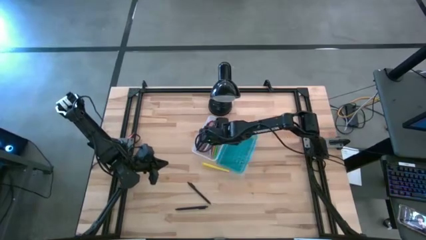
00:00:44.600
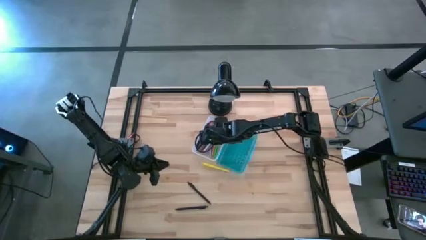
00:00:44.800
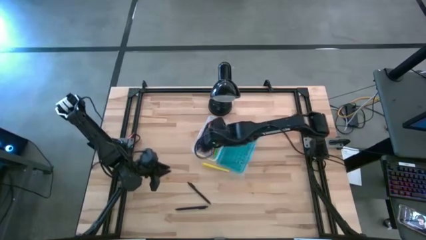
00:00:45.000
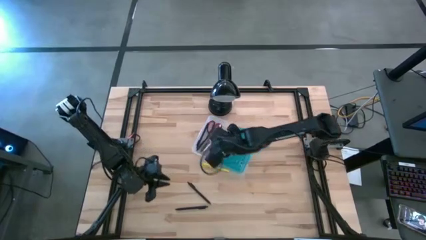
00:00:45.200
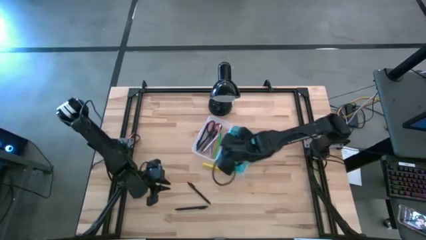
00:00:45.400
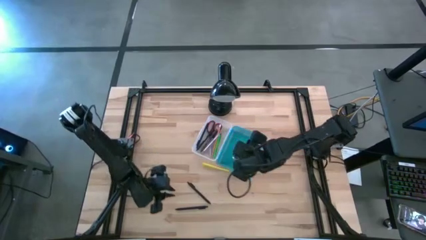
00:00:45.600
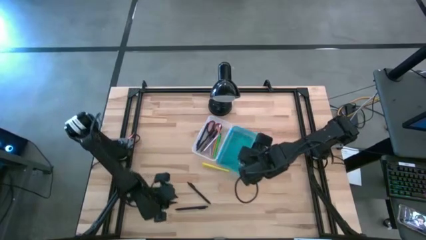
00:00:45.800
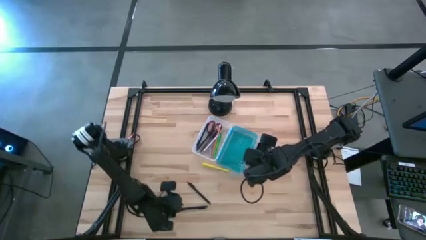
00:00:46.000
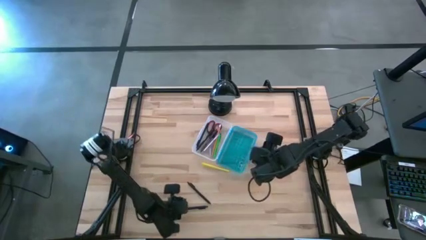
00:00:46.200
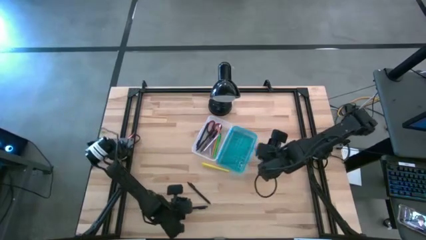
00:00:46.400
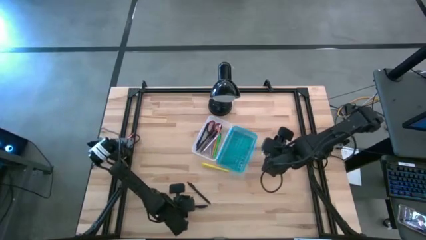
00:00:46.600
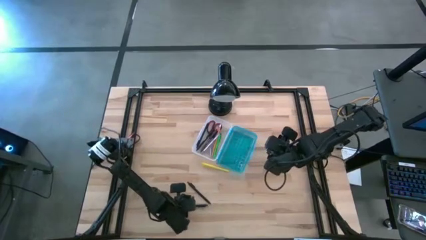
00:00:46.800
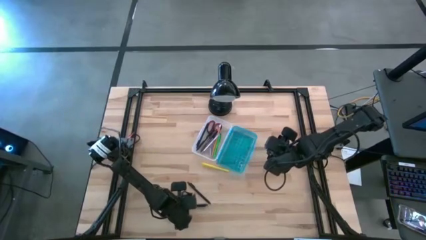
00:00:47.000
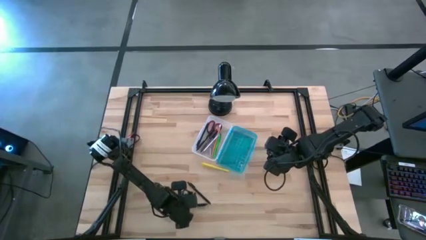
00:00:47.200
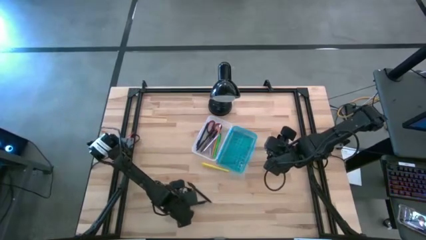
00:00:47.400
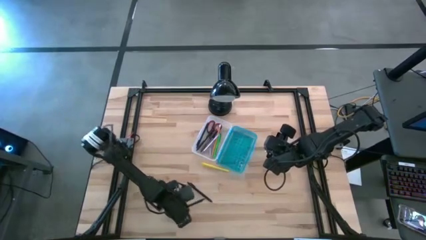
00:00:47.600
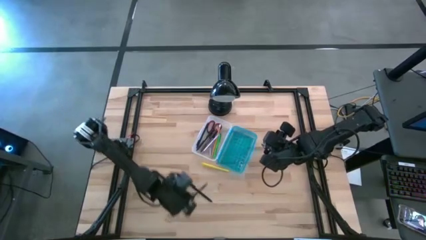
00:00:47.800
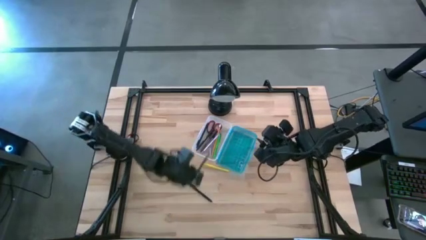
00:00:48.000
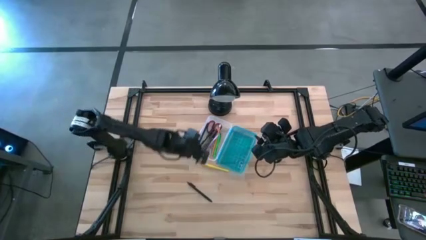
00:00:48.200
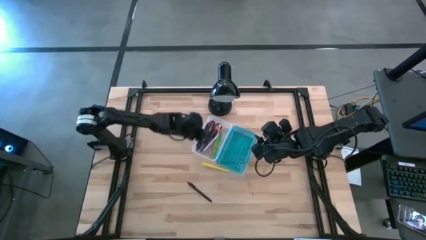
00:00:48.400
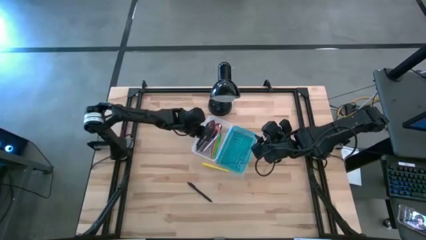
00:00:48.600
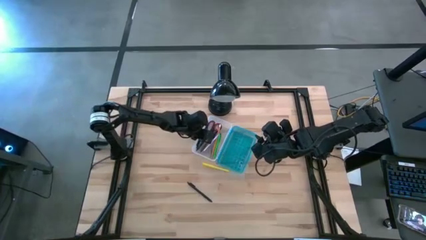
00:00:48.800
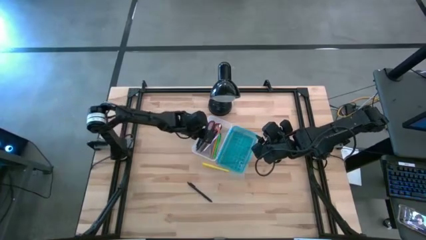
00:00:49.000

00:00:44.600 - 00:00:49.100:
Task: Pick & place school supplies into a supply box
Put the black pen into the supply box

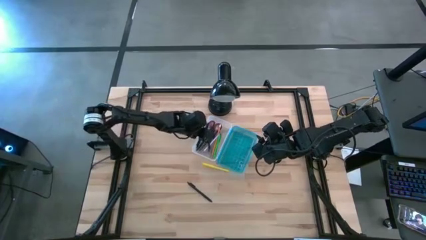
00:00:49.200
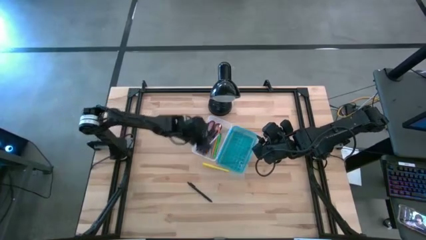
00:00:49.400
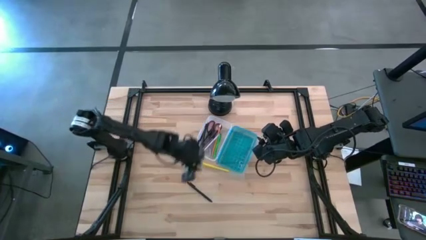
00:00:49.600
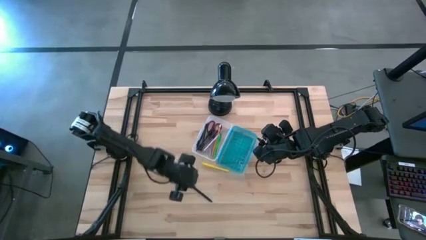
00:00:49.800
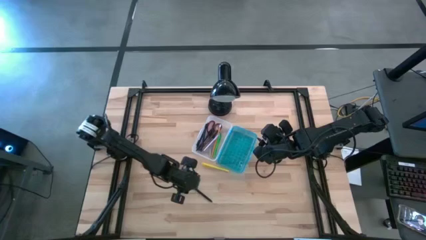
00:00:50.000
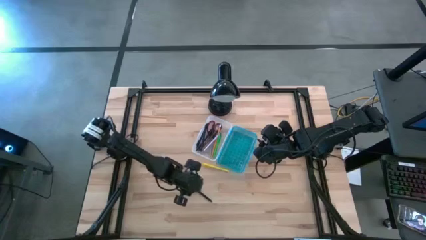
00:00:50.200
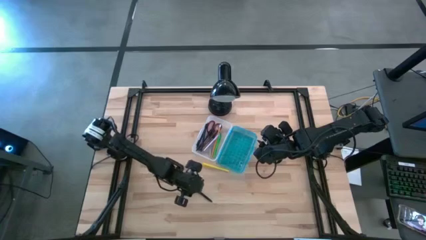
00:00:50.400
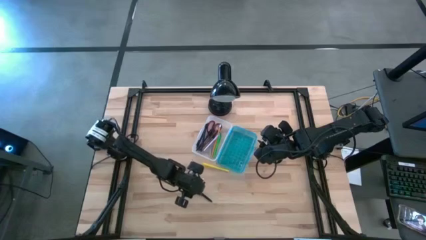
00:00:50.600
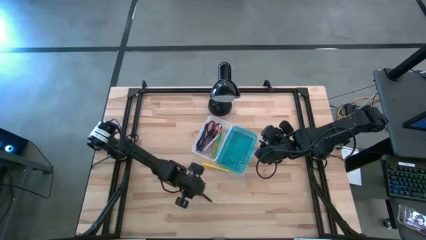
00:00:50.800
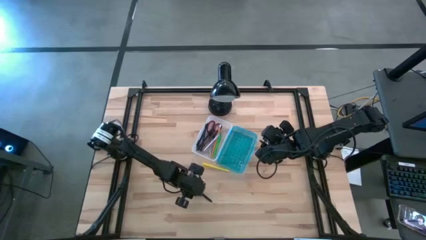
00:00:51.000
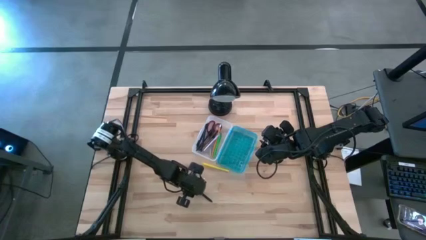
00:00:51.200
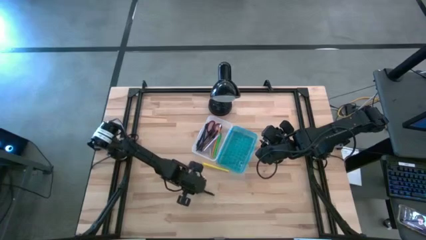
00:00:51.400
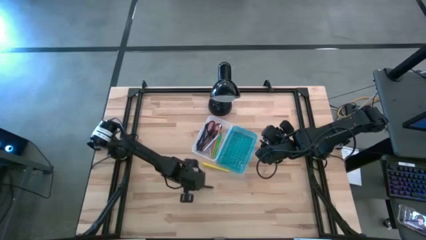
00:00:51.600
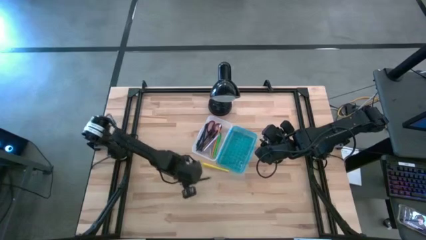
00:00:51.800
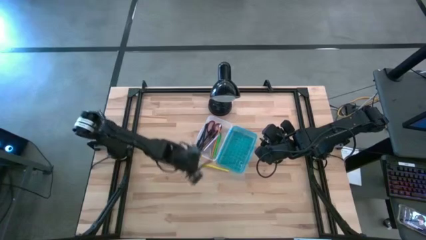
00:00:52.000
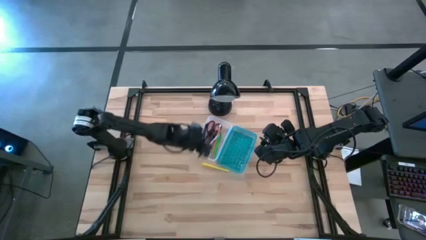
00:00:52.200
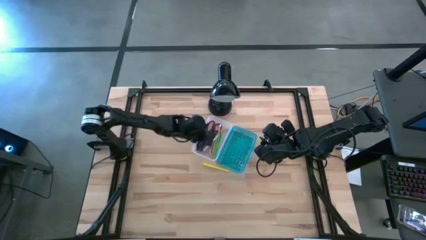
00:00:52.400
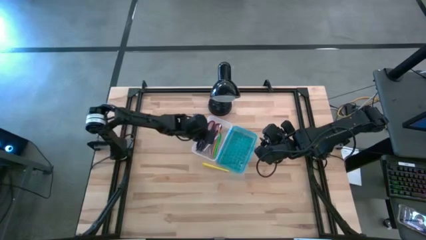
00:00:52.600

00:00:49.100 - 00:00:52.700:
Put the black pen into the supply box

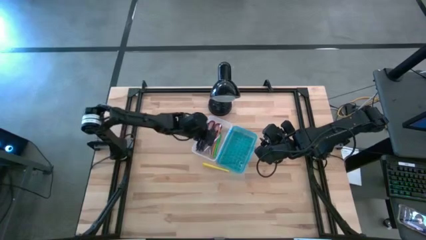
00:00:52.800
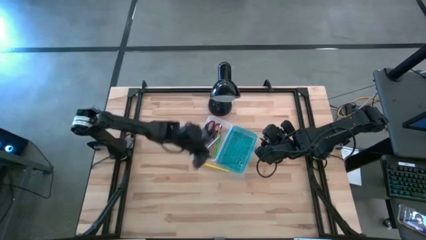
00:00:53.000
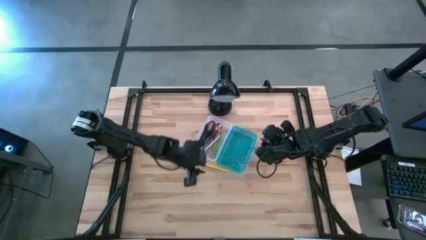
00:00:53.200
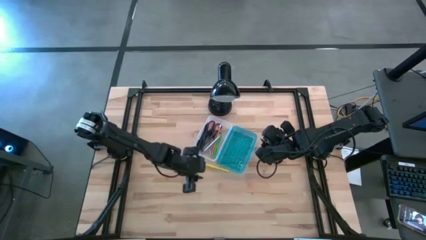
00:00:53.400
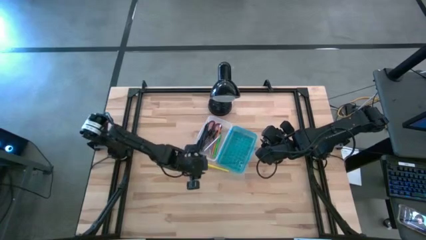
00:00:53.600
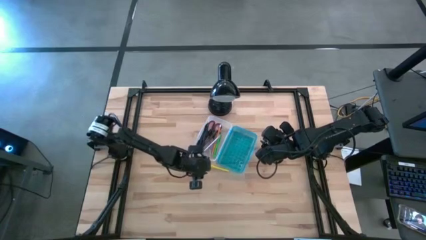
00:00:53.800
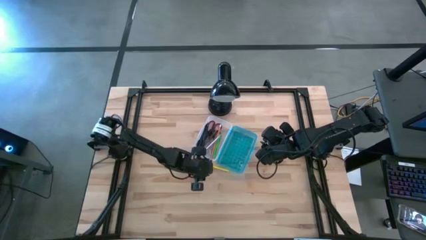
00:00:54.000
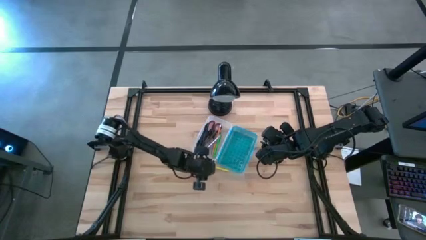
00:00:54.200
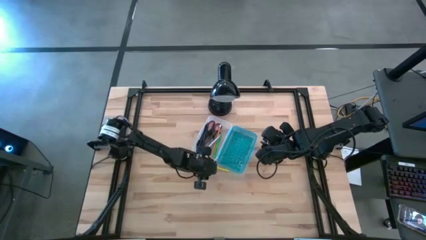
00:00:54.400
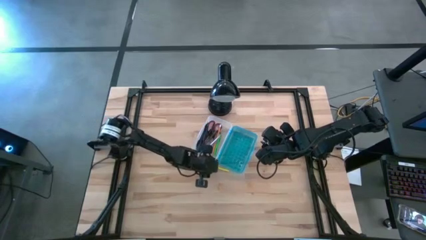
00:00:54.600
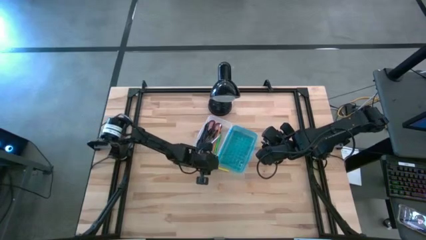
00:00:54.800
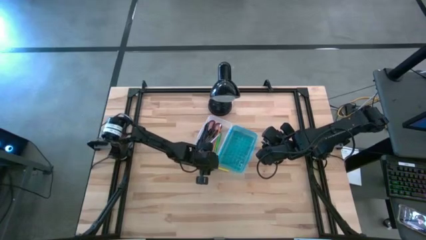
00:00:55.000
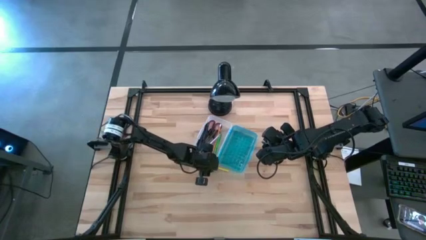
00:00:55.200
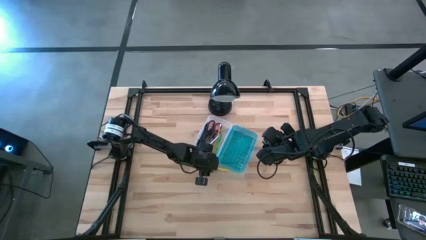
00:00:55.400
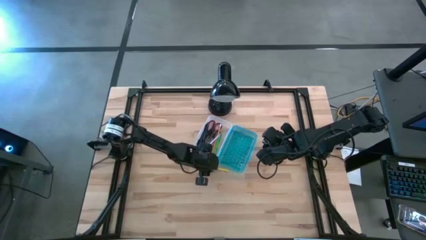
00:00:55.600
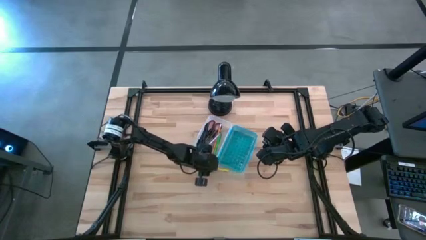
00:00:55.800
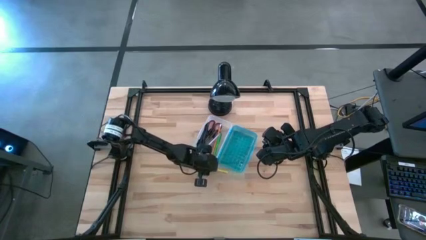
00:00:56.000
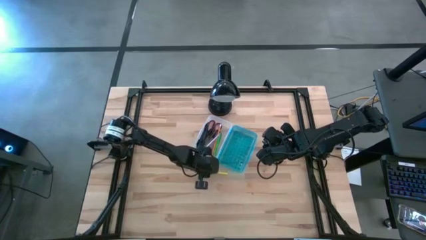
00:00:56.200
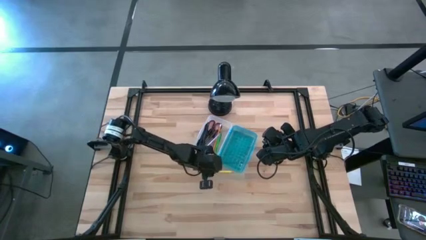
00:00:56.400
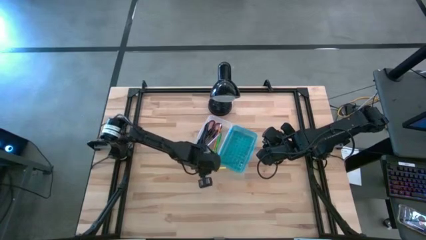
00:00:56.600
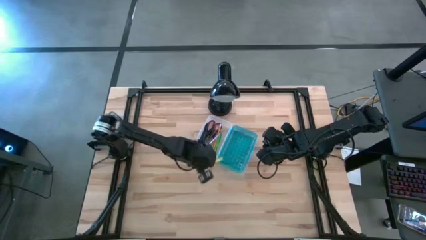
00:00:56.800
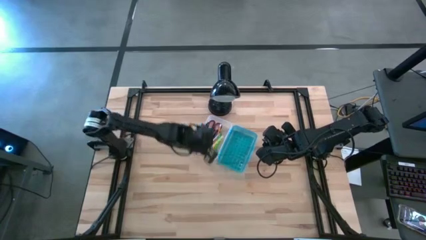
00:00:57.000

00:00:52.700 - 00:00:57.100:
Put the yellow pen into the supply box

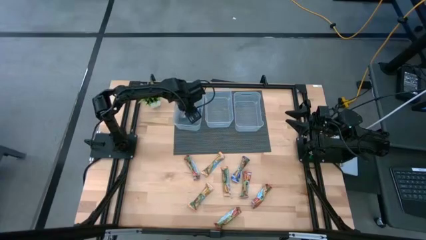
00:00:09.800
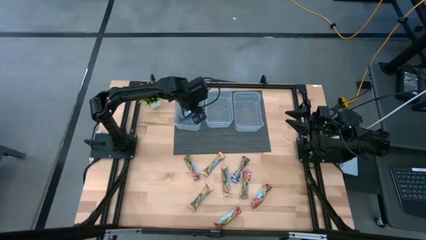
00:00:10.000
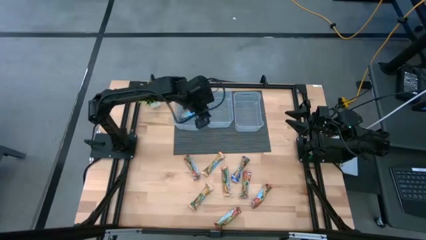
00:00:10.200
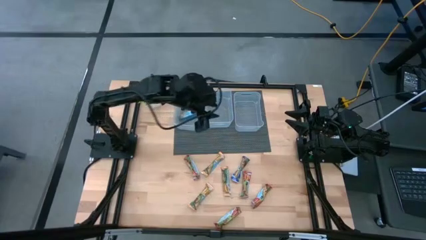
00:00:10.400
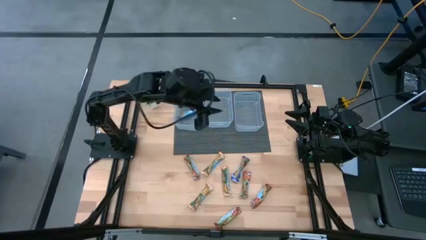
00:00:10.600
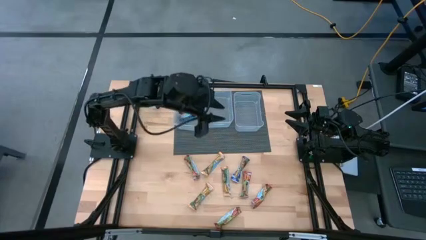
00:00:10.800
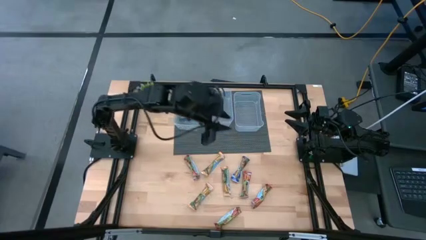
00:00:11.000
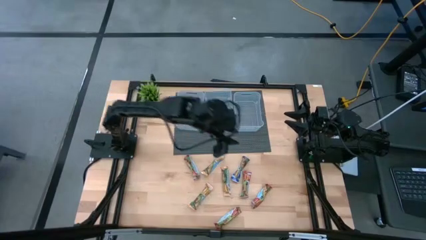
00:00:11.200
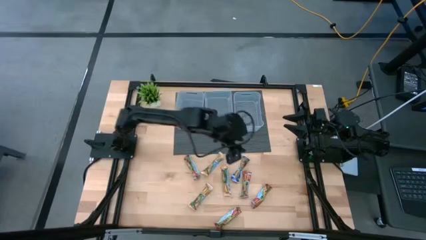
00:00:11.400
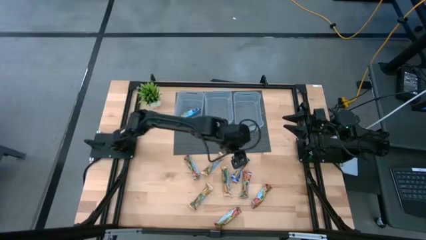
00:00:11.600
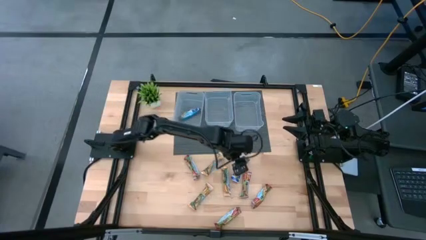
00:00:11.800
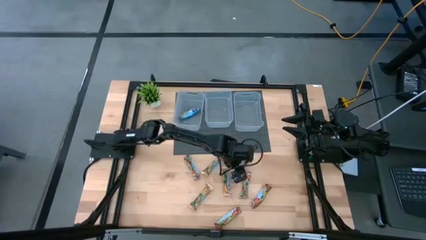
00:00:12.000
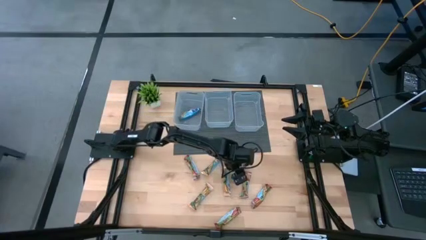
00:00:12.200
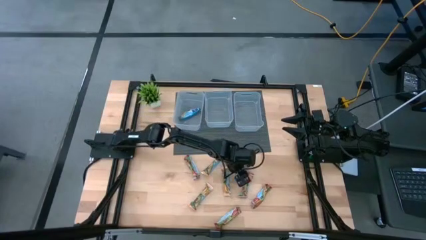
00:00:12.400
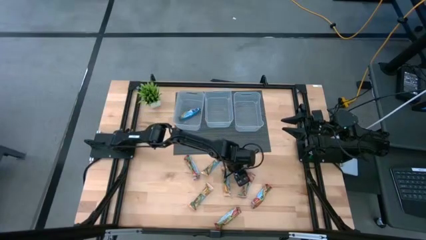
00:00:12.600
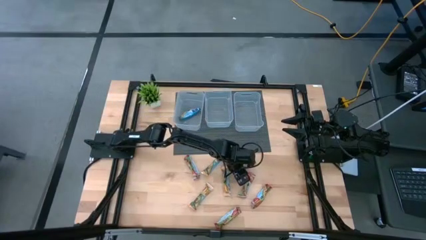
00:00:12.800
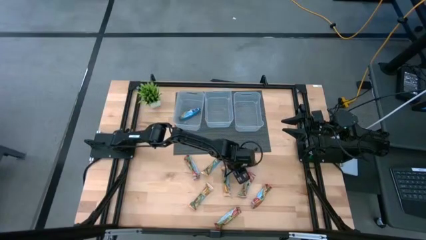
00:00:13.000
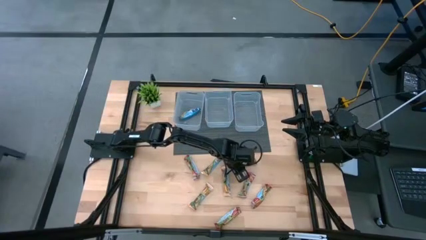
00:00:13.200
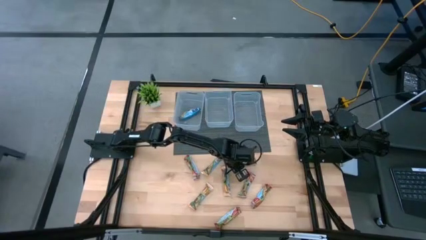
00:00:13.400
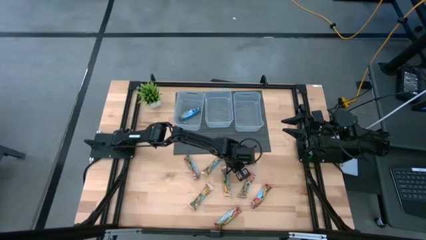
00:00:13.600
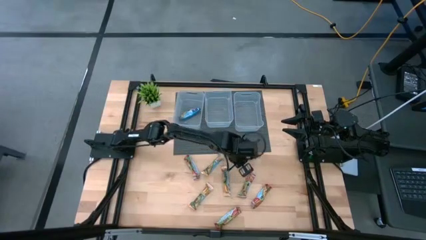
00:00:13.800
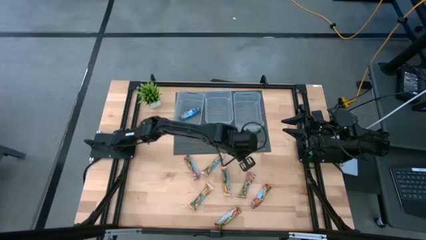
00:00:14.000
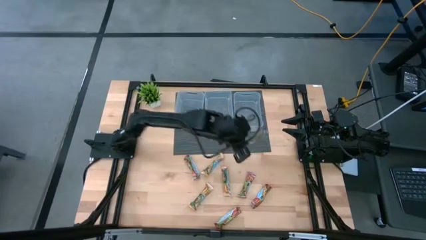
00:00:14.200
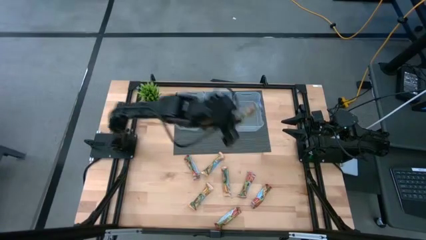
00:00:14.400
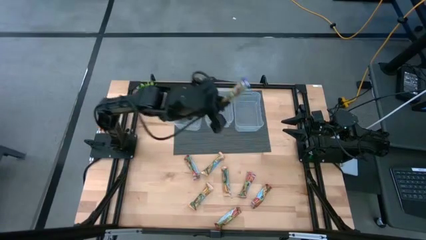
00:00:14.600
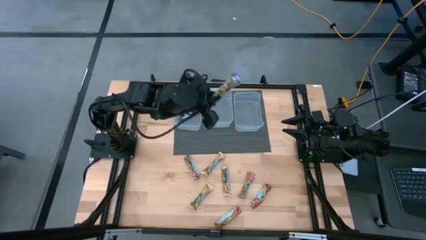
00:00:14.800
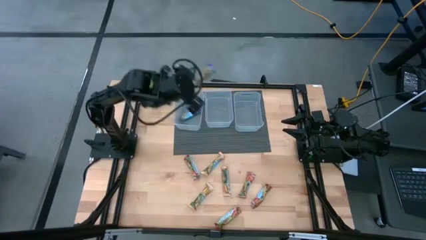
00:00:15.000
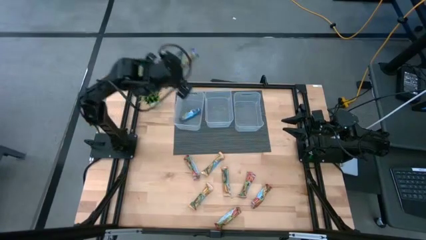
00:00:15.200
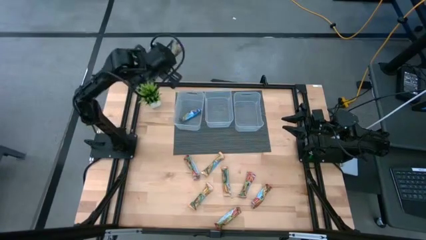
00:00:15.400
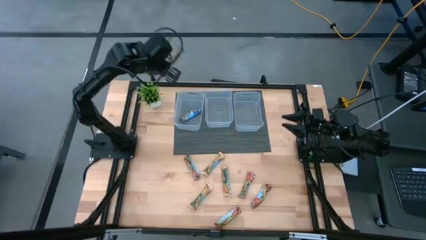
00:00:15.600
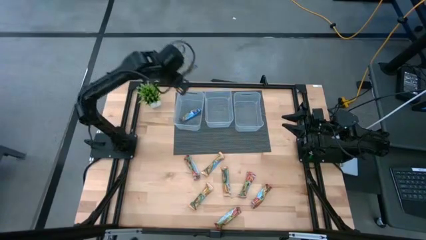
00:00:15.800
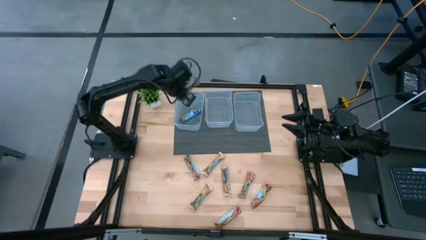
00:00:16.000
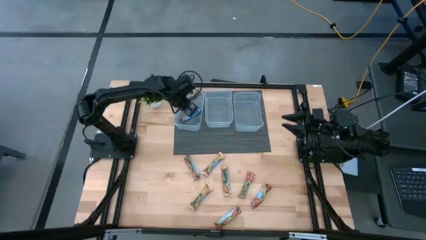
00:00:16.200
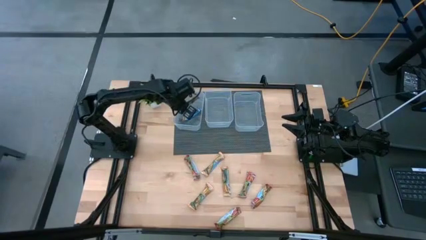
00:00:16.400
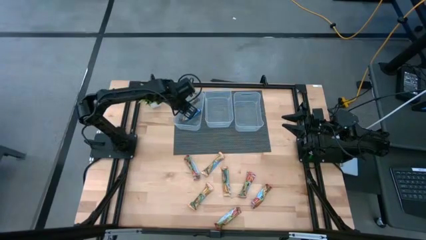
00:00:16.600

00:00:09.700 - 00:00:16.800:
Task: Pick and place Granola Bars by type
Put the blue granola bar into the left transparent bin
